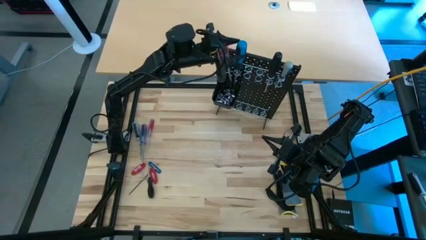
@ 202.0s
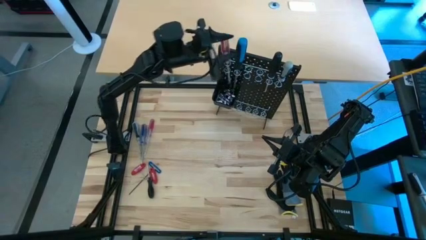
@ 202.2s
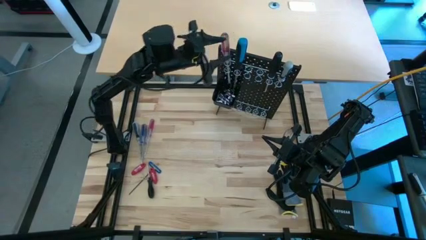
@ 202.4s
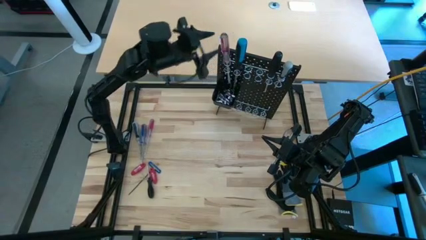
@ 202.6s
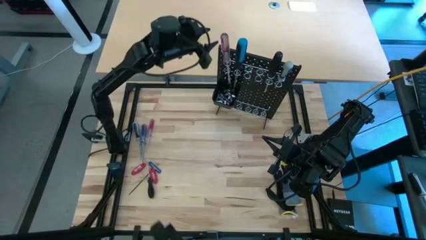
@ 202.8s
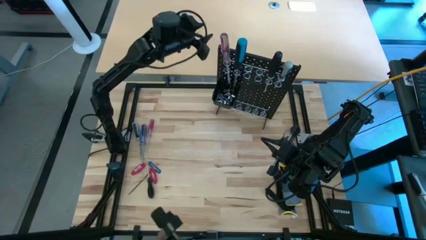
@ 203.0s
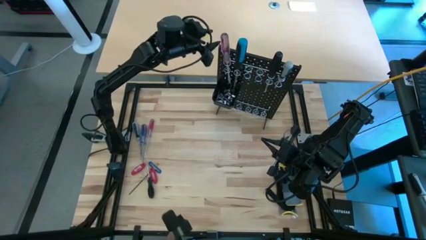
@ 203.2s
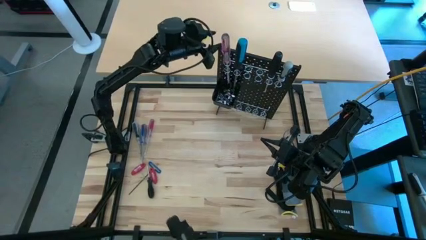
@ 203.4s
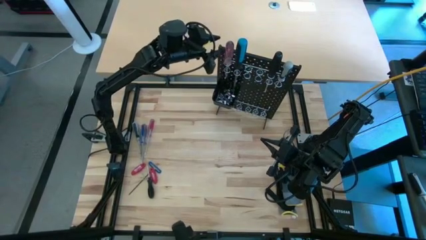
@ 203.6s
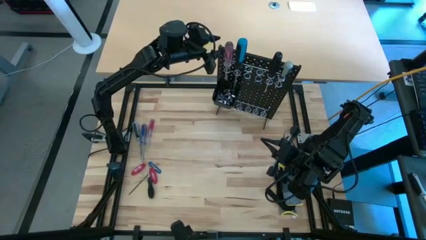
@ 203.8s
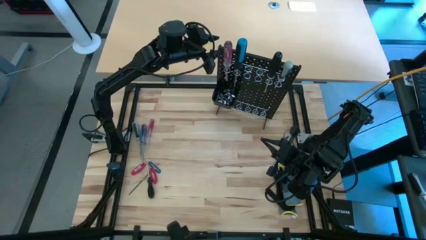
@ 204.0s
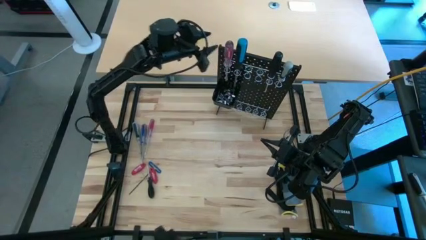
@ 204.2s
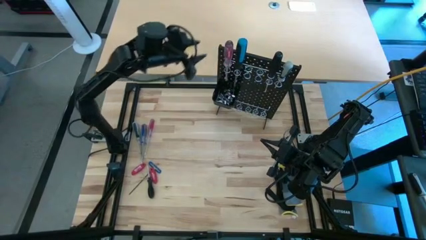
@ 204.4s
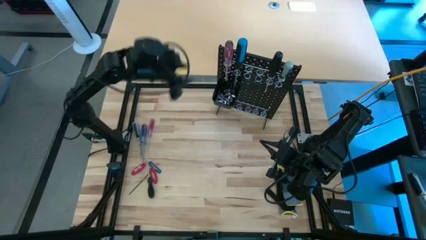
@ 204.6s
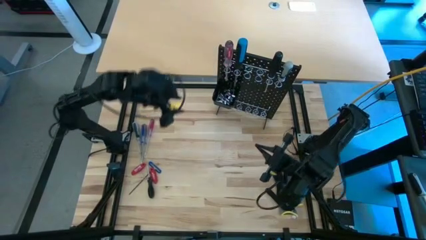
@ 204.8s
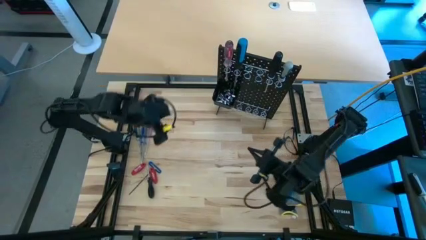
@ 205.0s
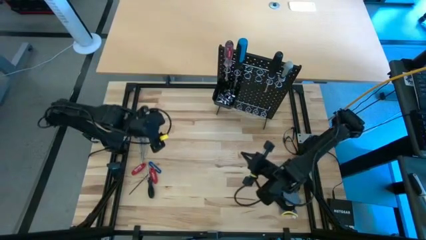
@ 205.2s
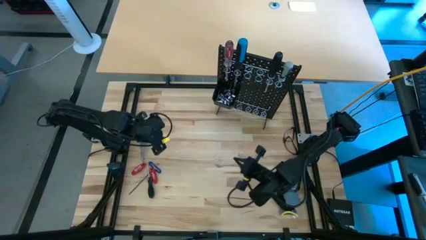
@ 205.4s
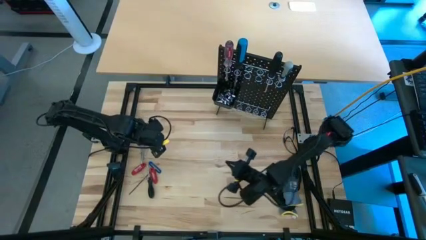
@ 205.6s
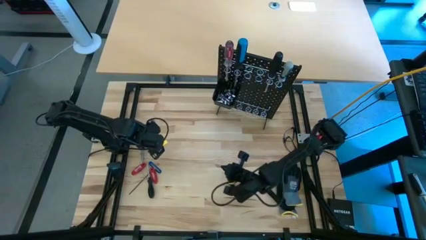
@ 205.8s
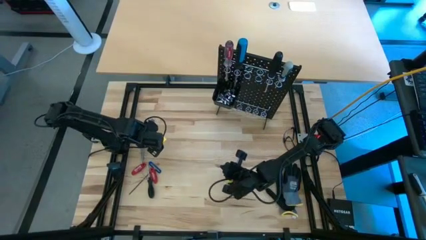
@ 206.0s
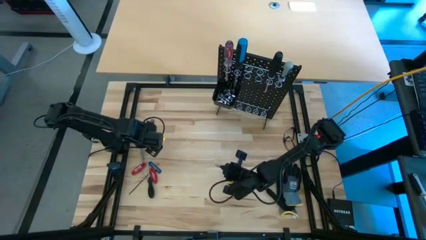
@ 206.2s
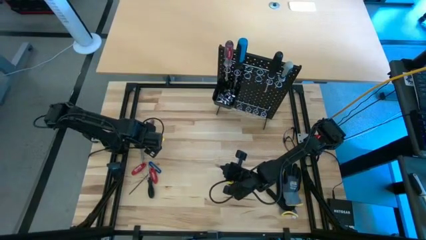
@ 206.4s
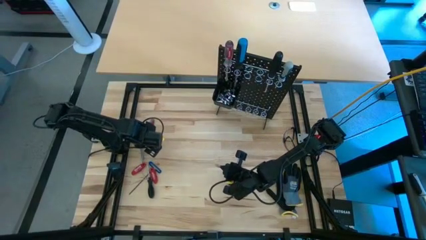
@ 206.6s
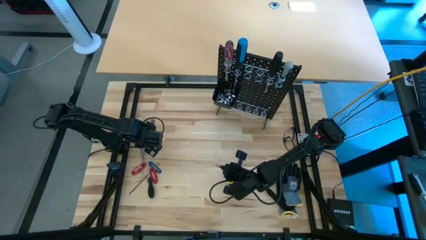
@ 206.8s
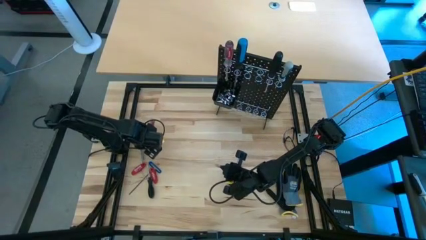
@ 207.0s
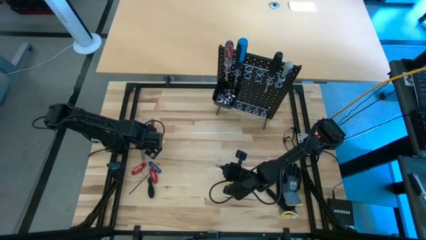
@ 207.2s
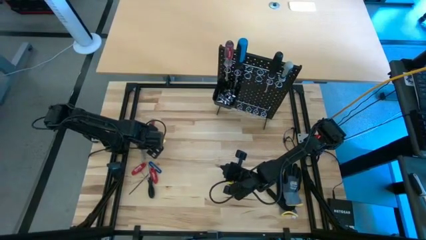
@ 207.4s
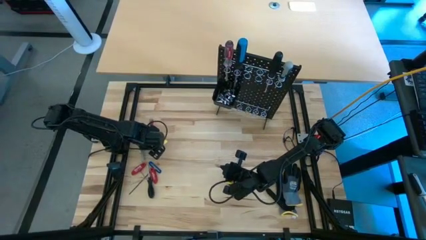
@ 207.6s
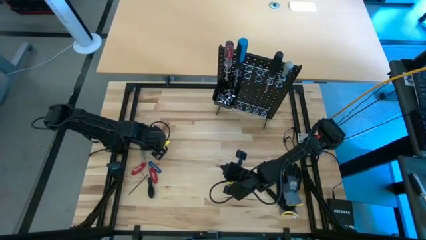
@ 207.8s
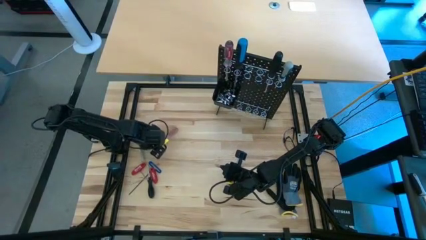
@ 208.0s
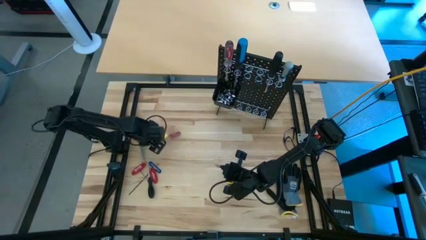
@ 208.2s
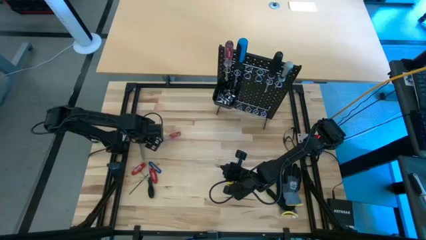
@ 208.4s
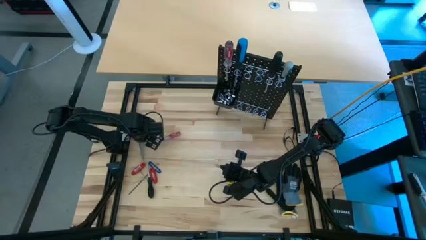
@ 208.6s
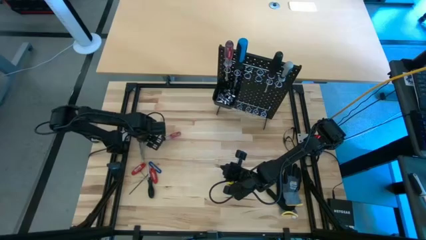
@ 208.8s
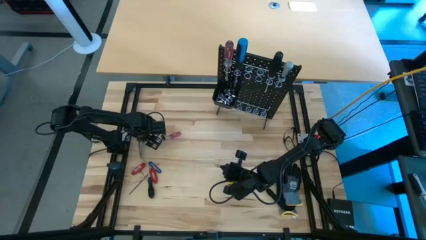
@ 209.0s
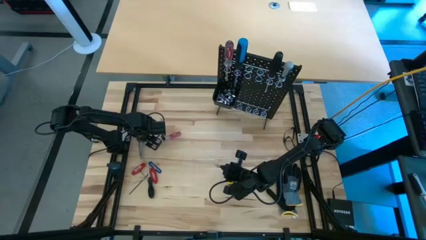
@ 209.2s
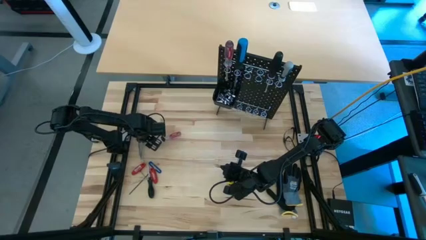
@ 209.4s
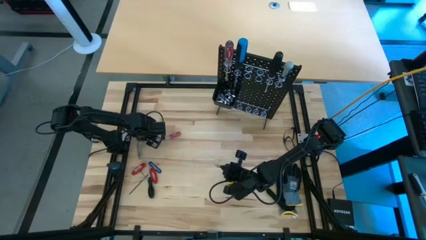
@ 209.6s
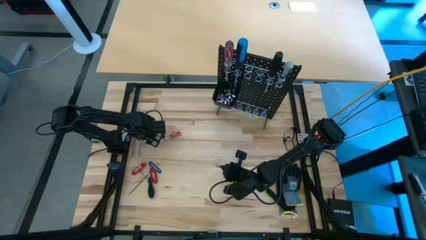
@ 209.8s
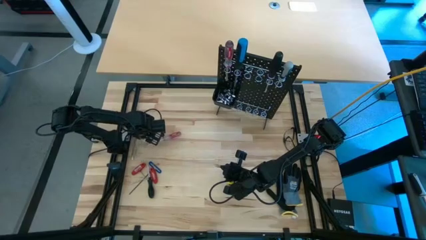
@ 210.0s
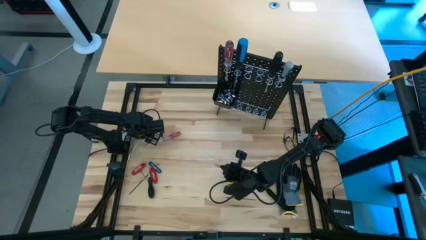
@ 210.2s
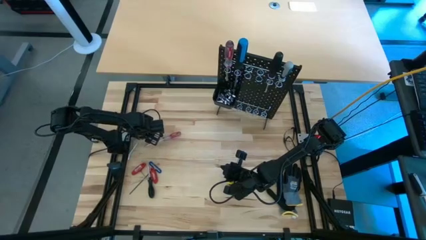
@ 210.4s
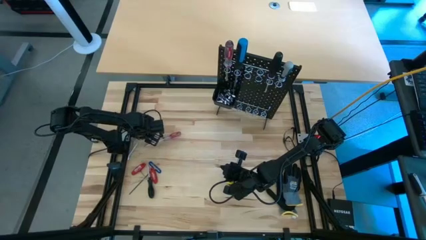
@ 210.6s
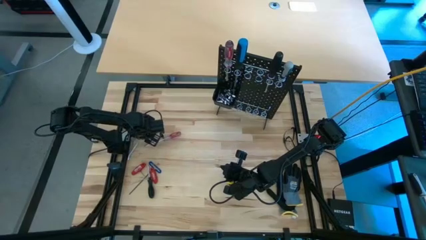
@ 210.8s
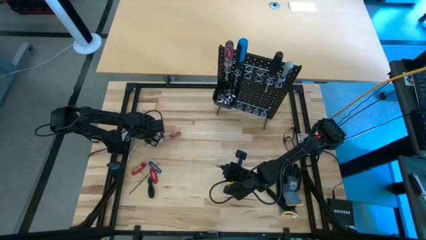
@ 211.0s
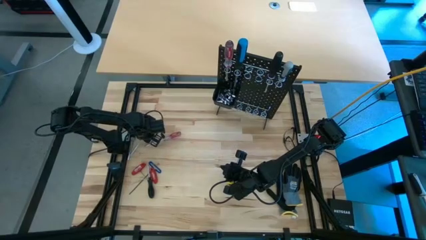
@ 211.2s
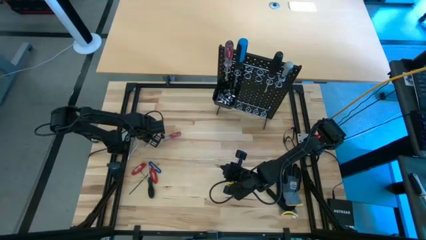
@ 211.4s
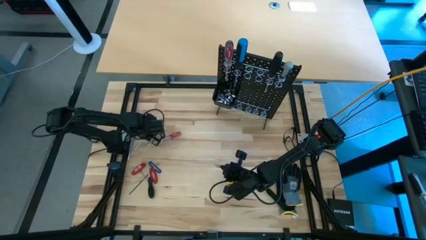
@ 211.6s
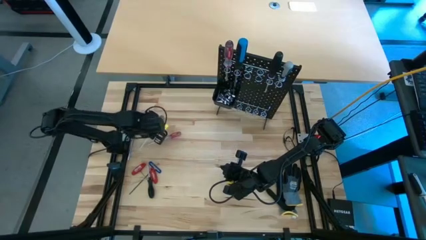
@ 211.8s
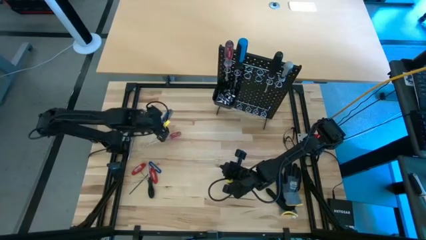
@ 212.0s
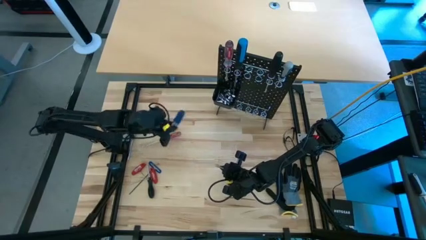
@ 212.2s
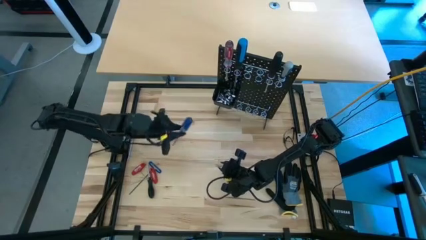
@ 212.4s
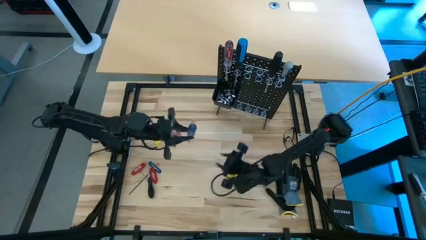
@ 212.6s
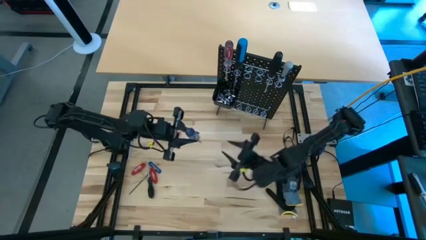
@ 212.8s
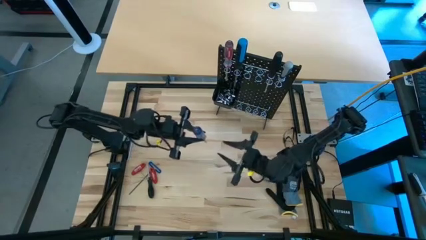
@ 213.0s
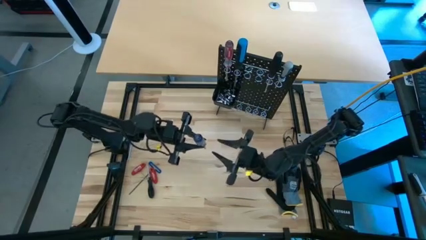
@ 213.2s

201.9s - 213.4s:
Task: Hang tools onto peg board
Hang the blue screwdriver on the black pegboard
